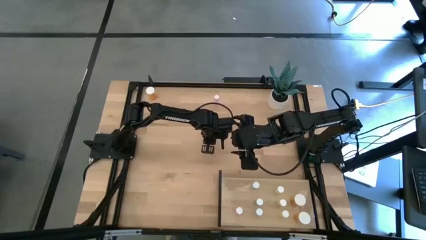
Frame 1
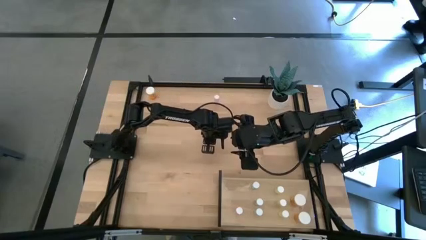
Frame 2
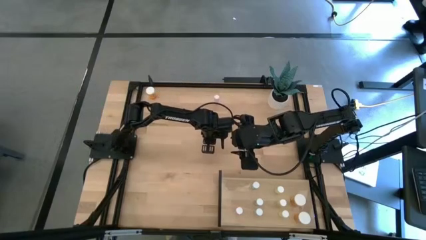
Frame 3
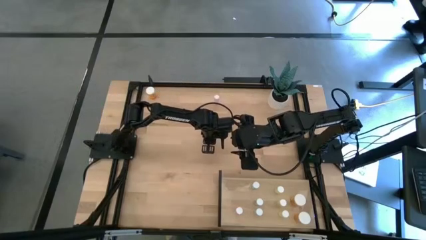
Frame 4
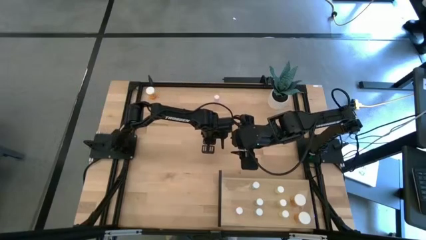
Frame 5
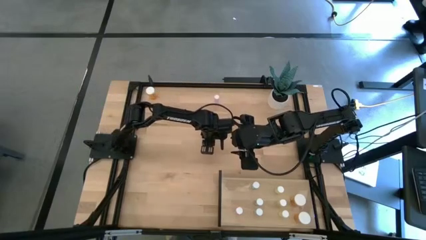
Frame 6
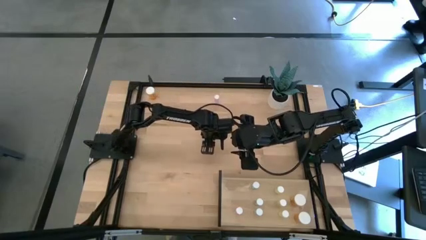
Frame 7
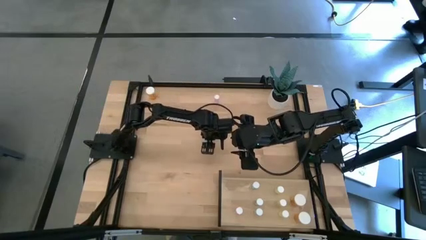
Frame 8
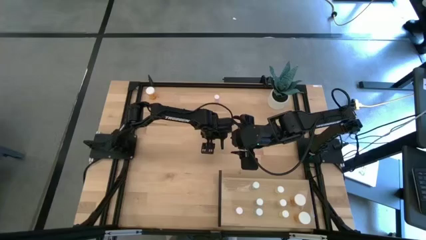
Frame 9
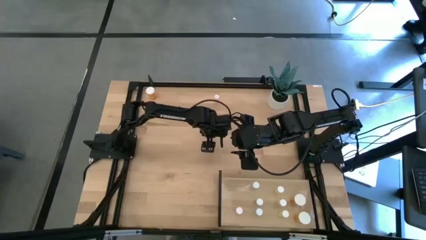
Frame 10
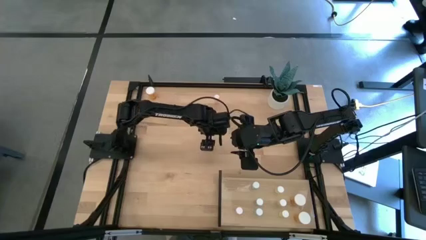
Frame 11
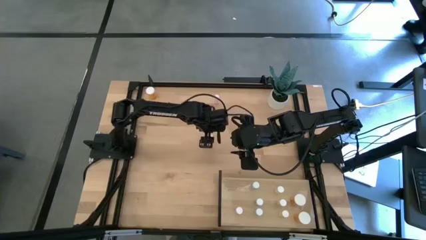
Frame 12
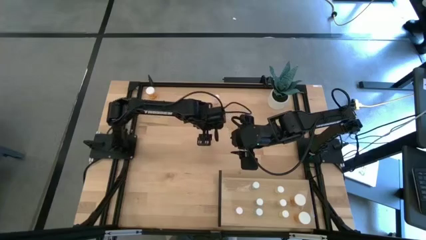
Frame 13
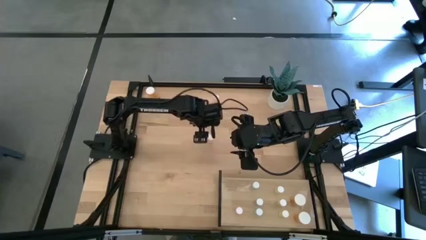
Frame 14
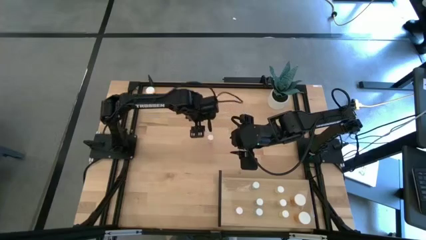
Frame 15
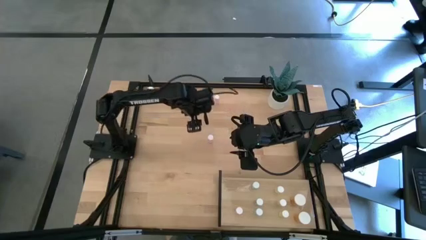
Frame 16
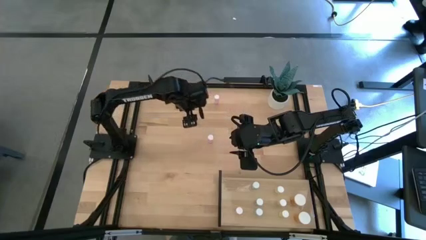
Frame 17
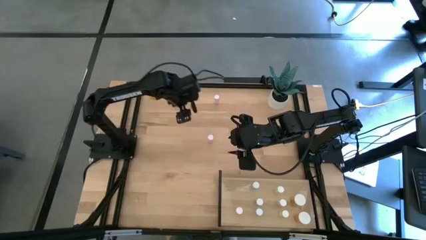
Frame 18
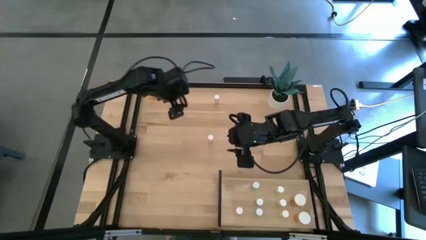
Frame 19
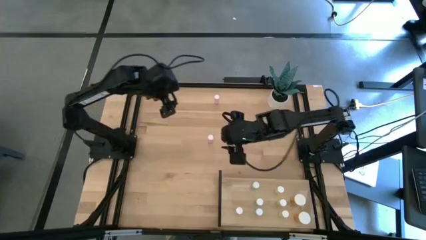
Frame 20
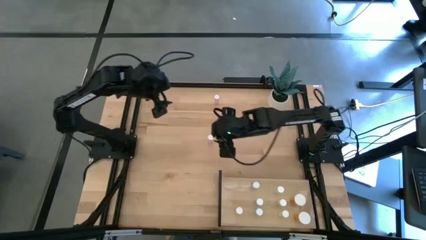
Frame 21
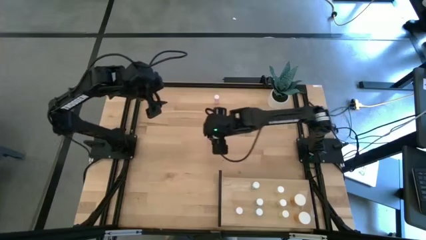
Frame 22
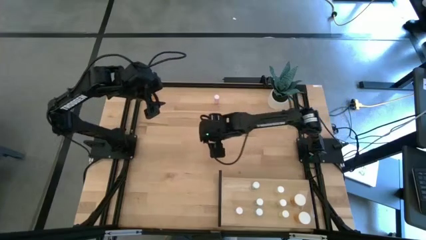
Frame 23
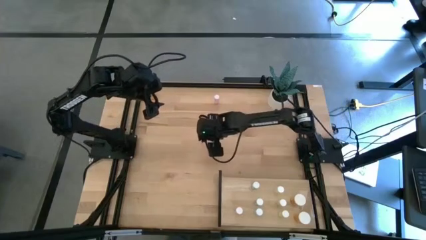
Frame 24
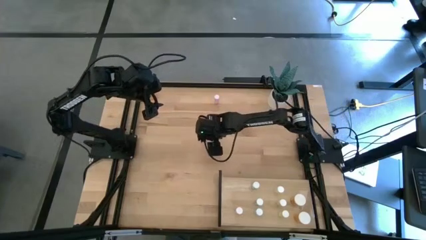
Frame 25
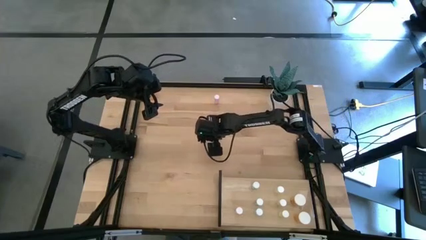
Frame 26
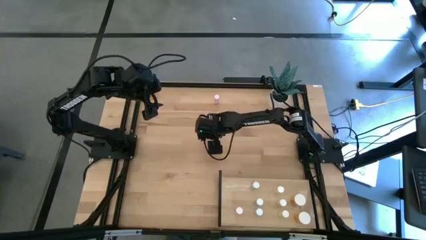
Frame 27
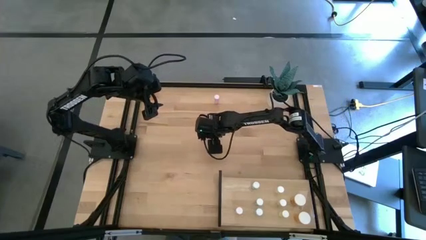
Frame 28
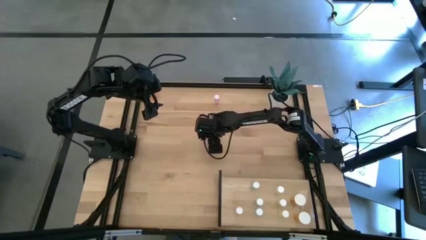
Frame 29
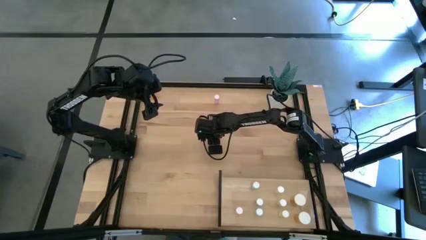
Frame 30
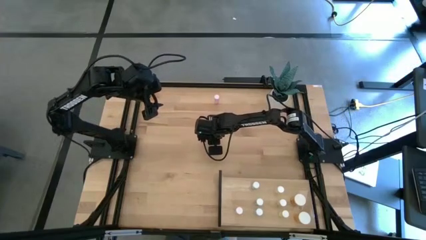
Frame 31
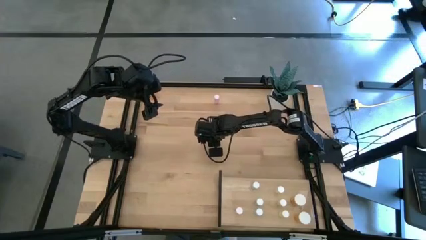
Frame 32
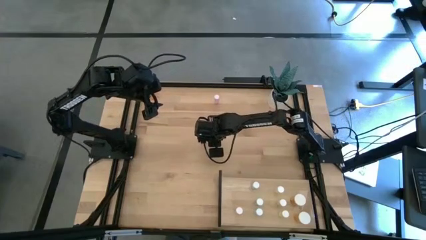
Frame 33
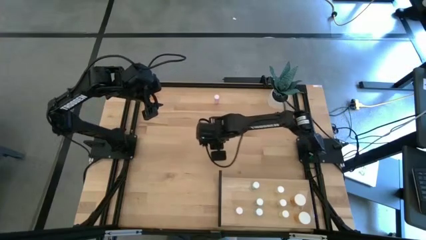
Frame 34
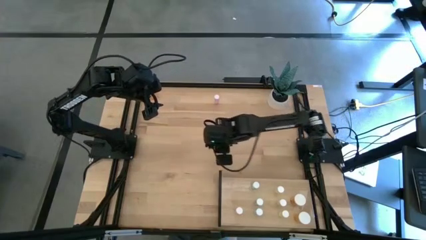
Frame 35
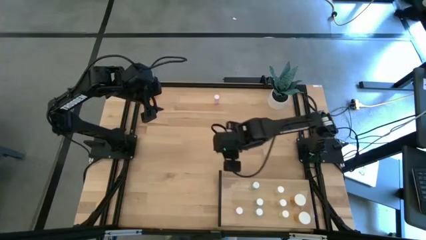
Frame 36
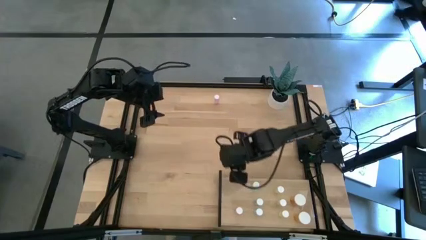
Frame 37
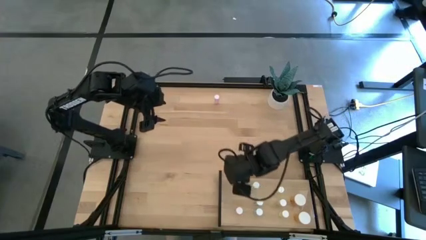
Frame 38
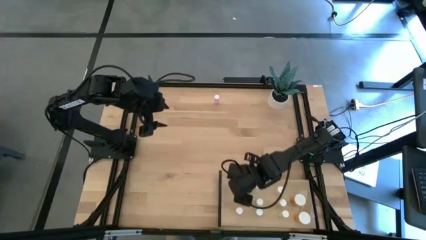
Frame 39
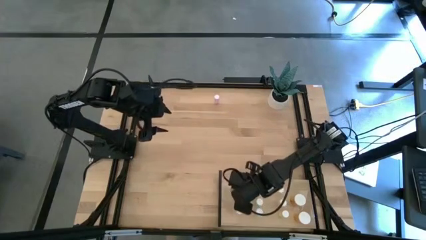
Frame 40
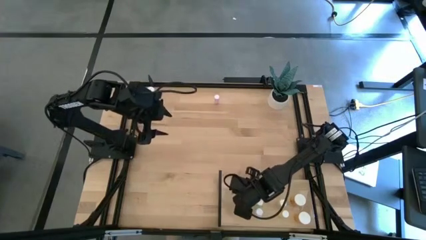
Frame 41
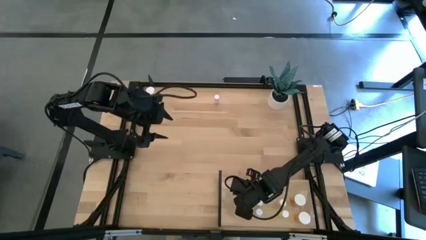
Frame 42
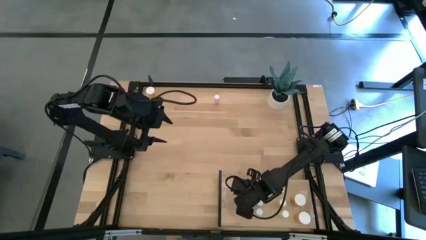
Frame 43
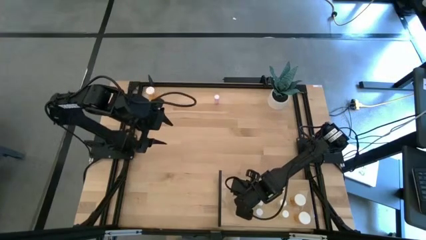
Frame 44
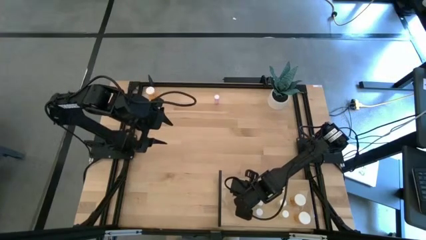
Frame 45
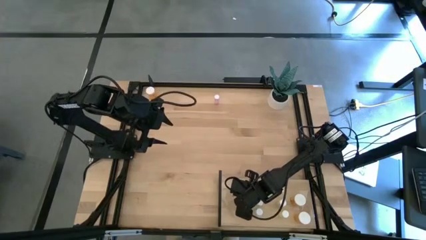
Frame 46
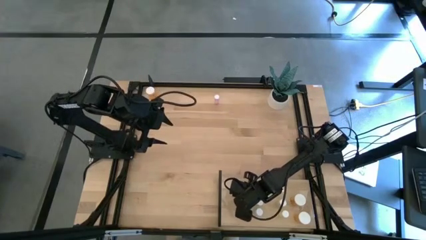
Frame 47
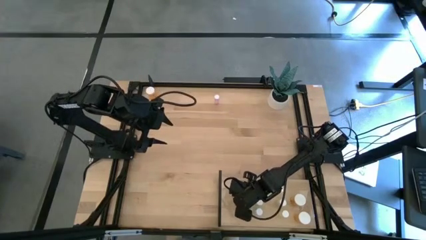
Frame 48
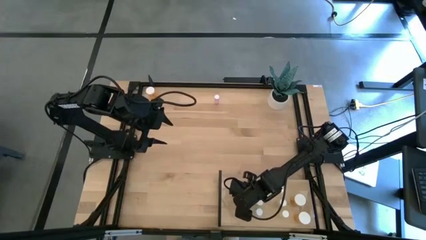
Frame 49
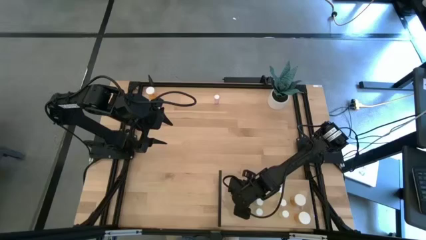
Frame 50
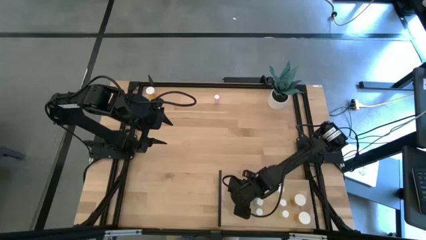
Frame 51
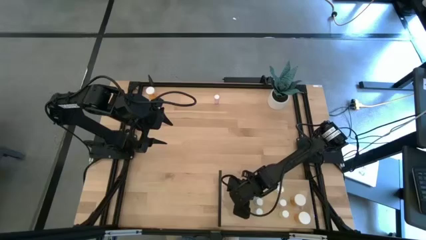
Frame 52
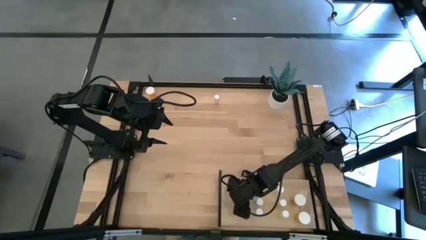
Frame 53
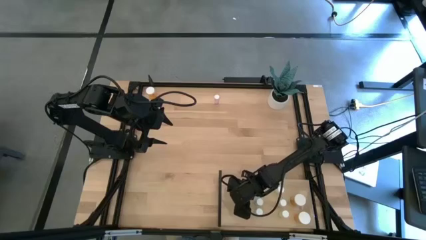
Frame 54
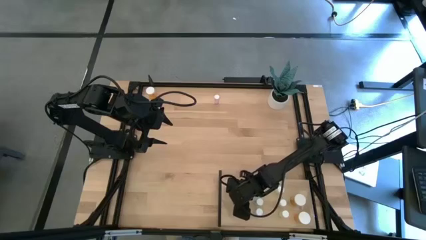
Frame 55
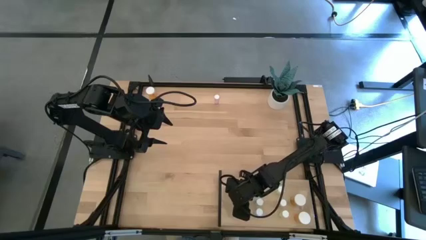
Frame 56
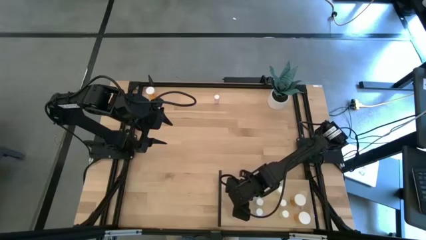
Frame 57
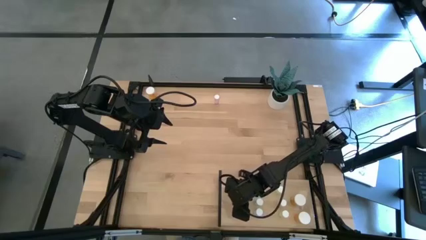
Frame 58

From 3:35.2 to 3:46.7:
Task: Pick and place medicine bottles onto shelf by color
Put the left pink pill bottle on the shelf aligned with the other pink pill bottle

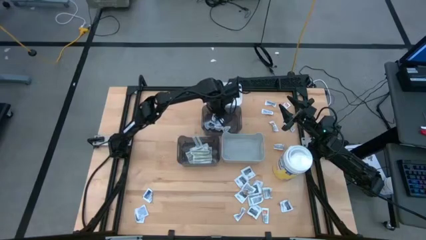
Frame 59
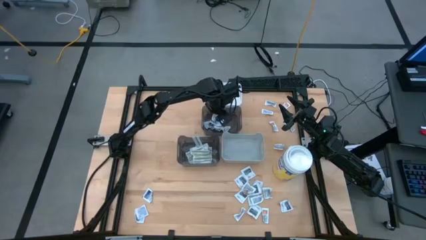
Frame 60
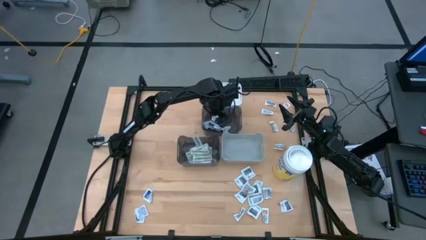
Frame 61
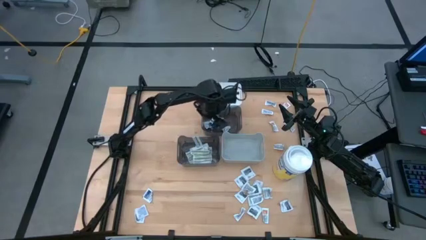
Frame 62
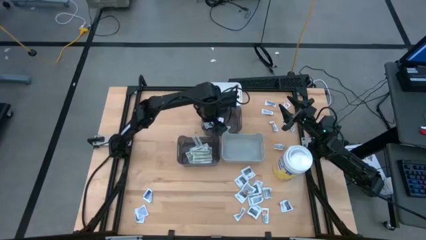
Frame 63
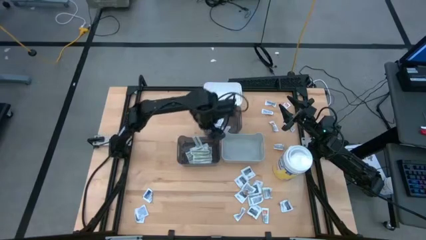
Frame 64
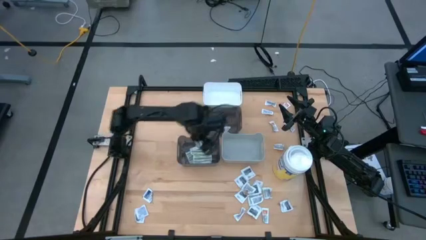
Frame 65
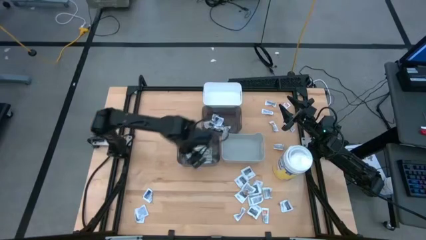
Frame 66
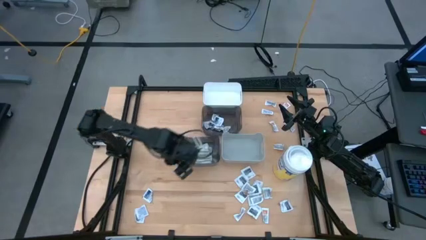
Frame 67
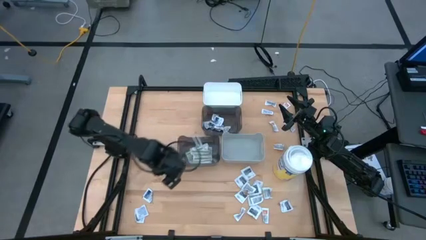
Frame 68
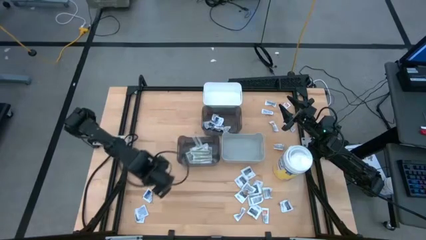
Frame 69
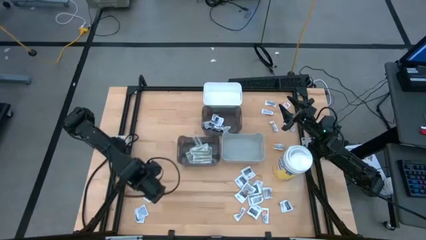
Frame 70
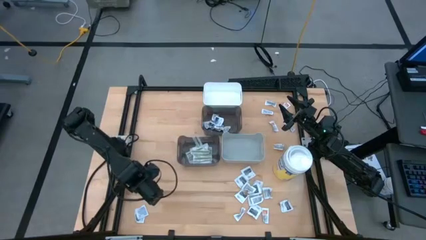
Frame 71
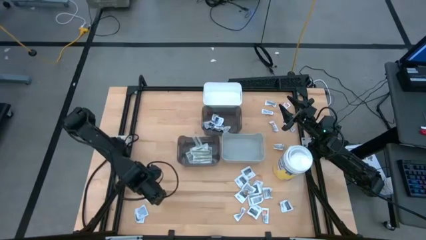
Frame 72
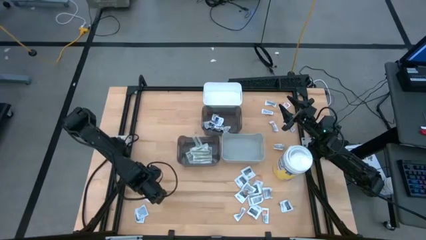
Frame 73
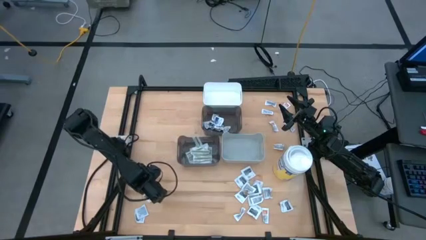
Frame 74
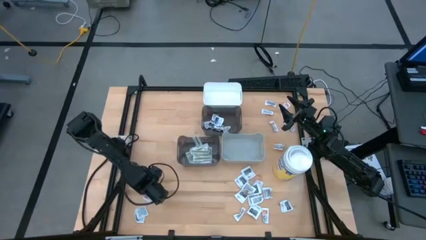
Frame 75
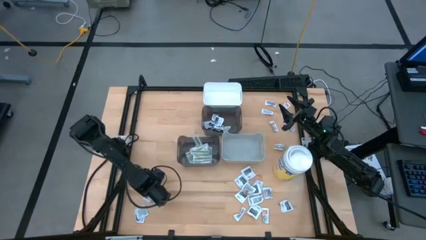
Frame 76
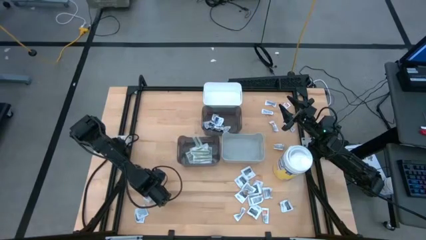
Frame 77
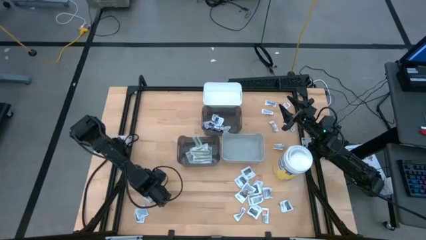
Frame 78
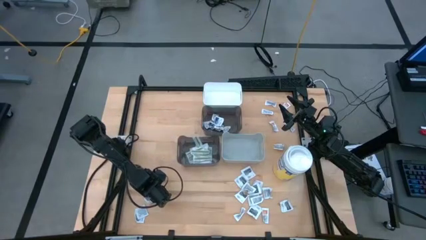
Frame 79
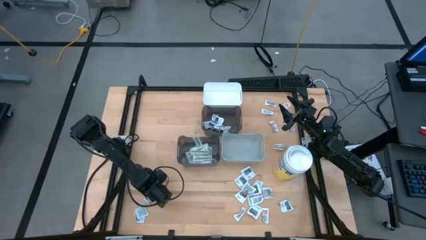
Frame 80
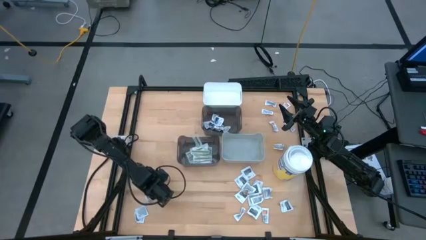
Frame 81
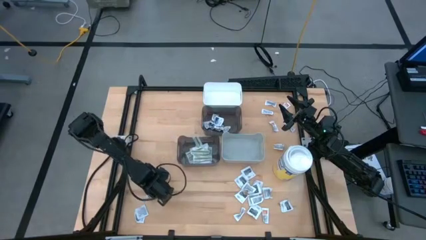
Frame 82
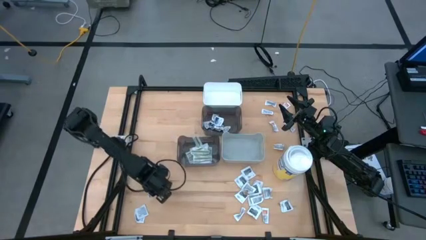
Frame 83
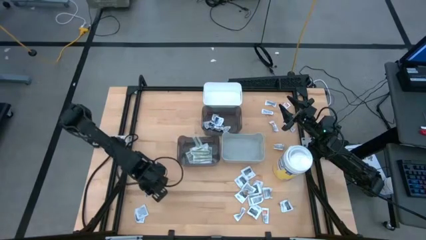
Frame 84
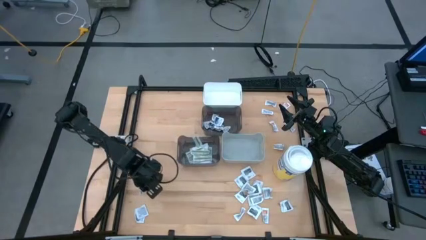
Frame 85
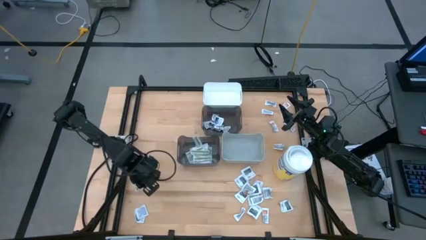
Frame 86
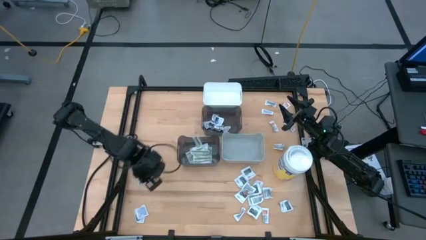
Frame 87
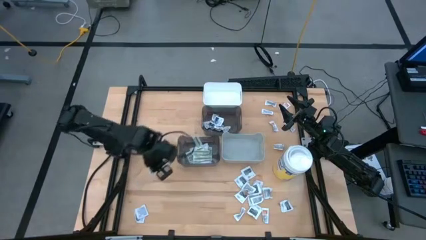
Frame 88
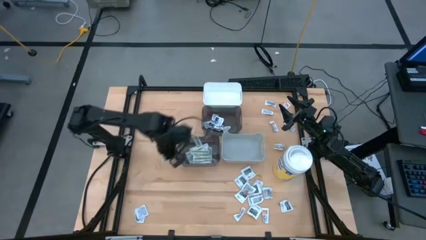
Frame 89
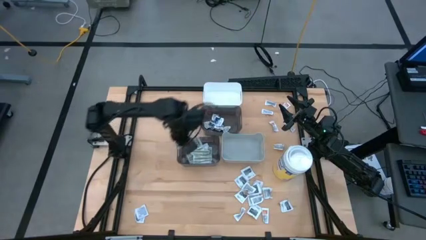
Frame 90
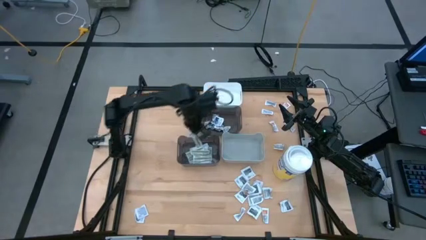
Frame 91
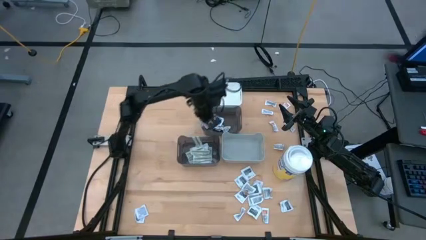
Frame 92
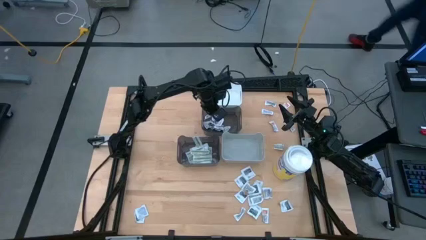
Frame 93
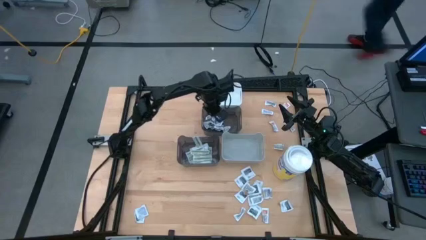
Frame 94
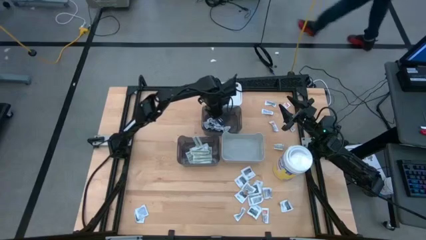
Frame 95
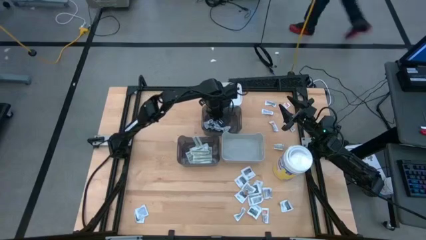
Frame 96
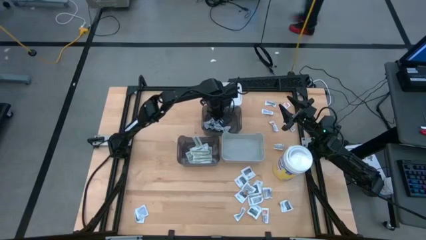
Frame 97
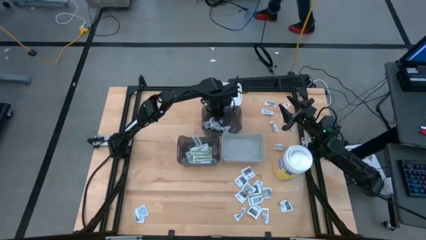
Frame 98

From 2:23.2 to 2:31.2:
Task: Pick & Place First Aid Supplies
Put the white alcohol pad into the top black bin
